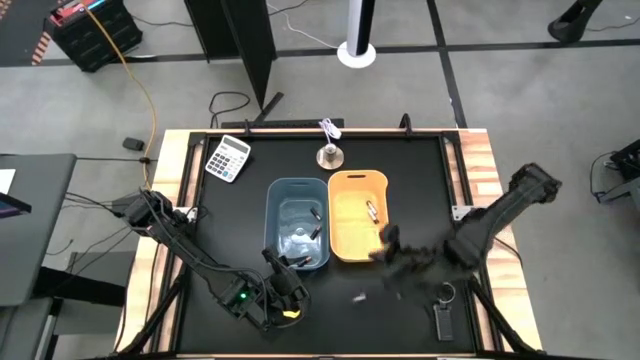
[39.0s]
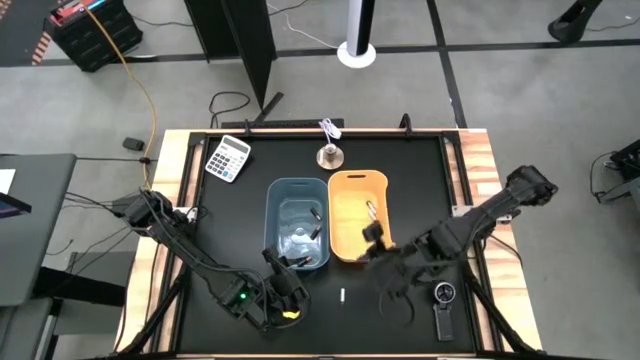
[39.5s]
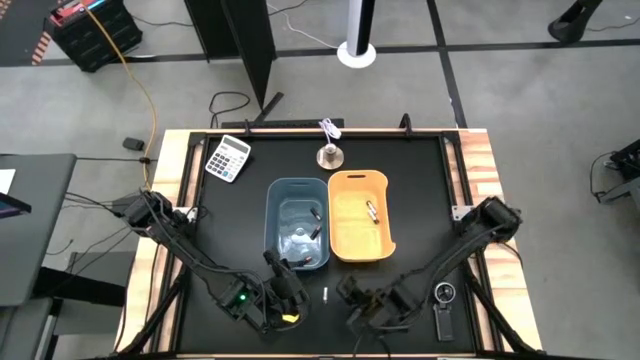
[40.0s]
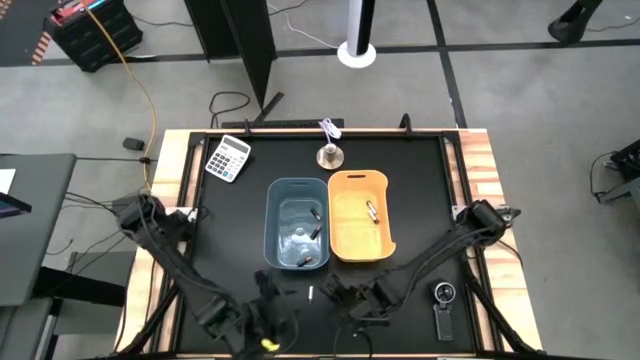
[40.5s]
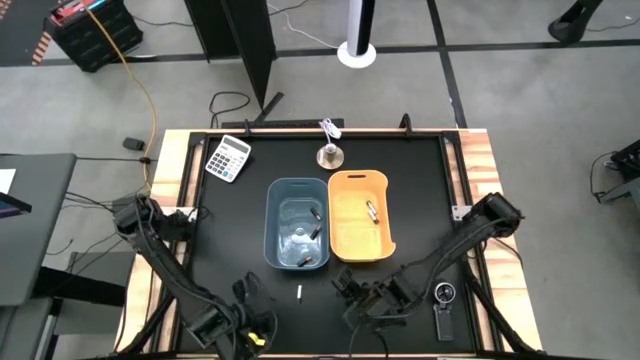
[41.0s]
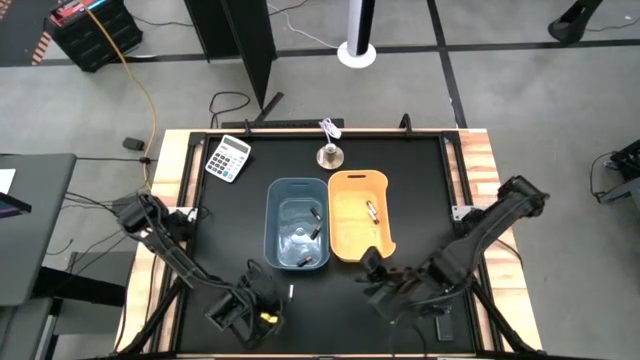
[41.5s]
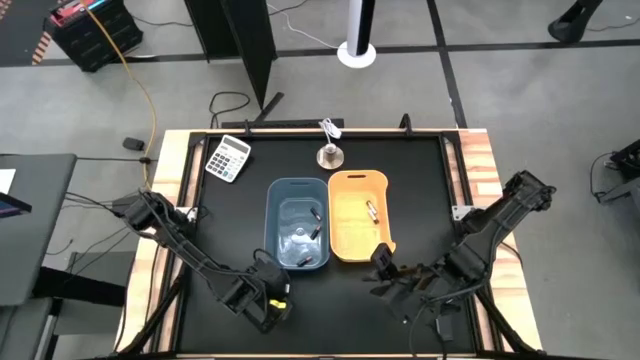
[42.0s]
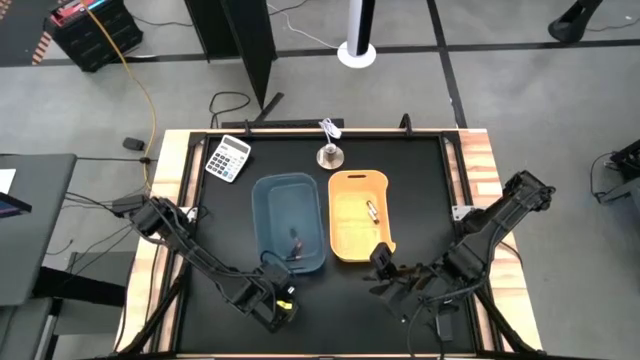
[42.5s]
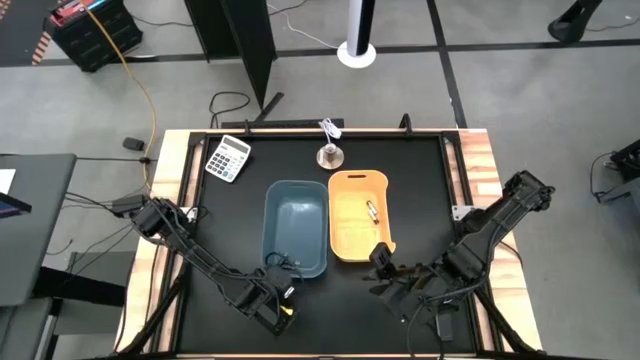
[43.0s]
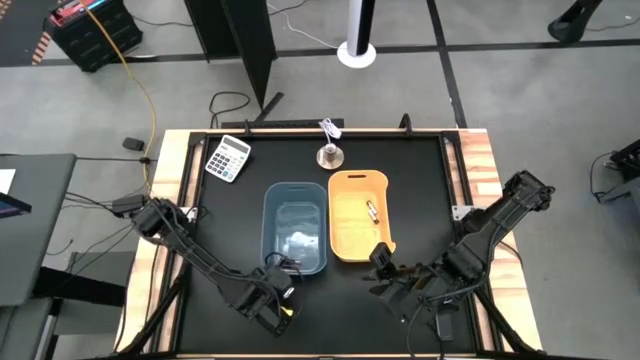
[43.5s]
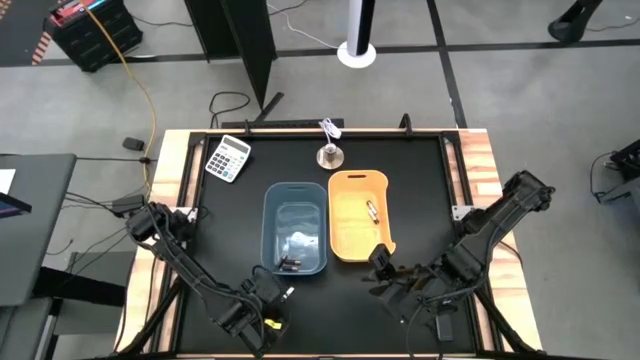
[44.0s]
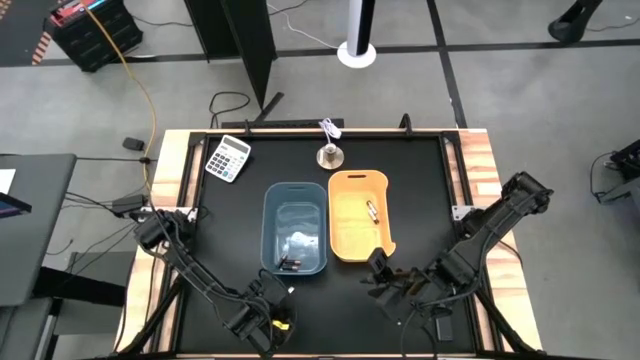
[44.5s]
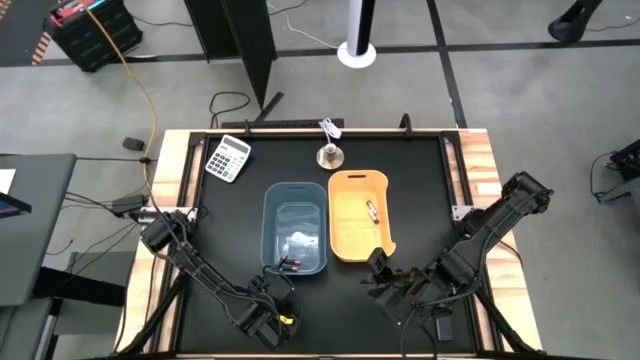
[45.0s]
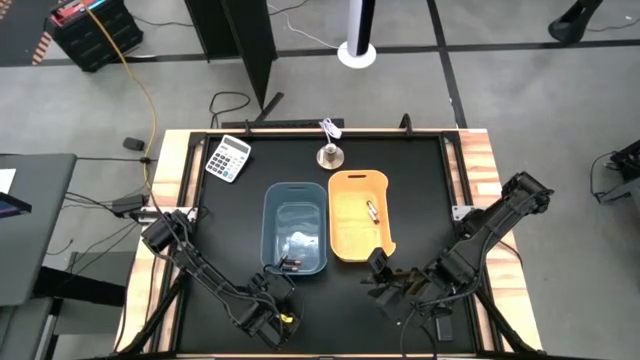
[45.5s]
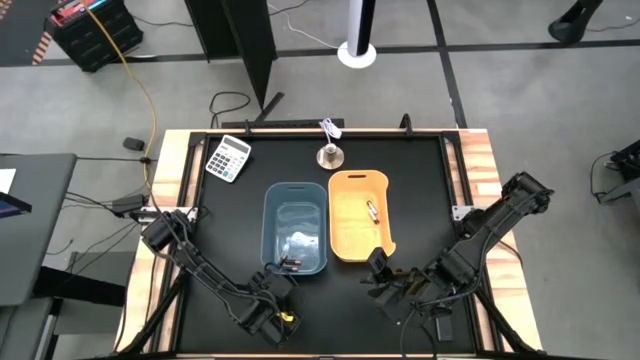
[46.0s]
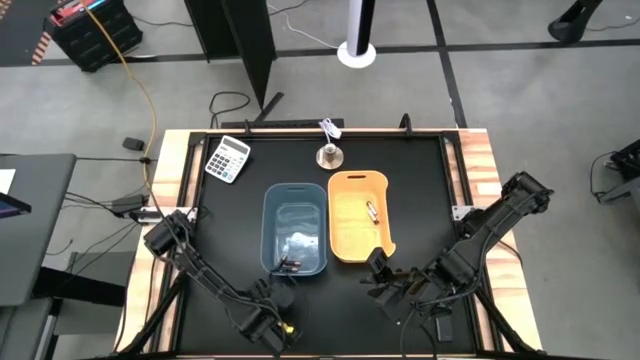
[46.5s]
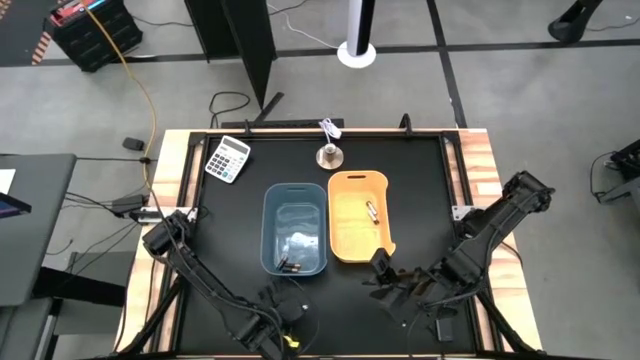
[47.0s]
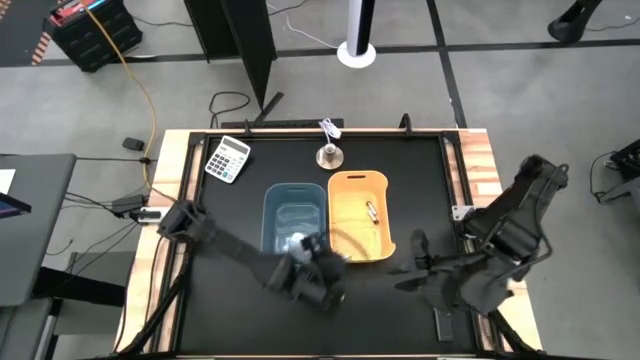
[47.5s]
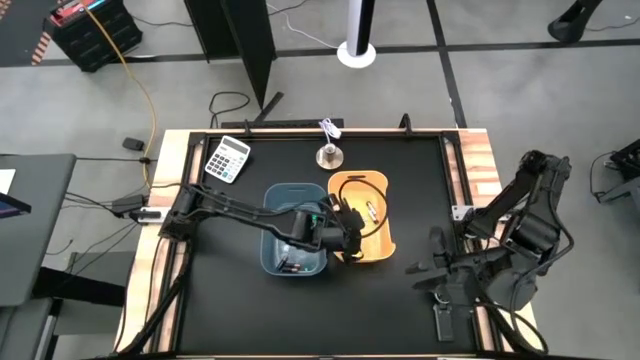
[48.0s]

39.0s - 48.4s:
Task: Sort batteries
Put the silver battery into the yellow bin

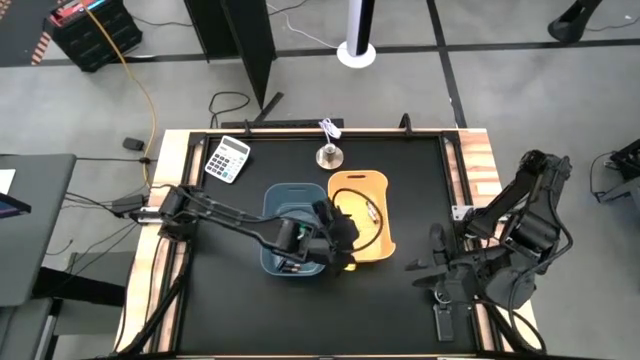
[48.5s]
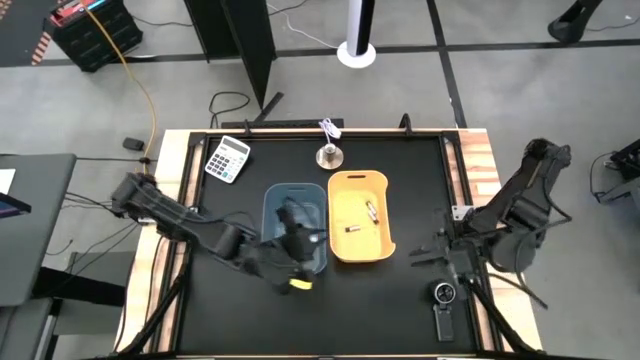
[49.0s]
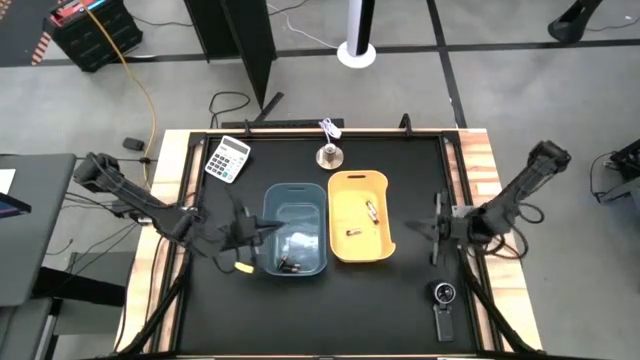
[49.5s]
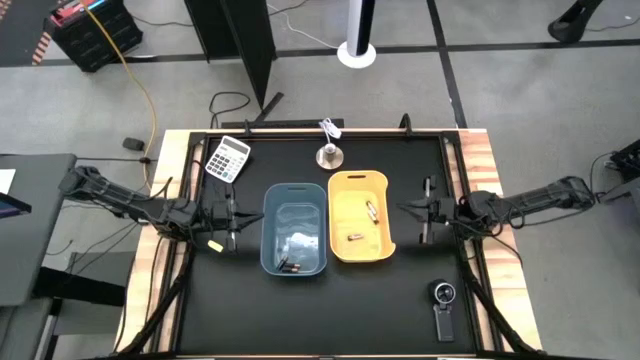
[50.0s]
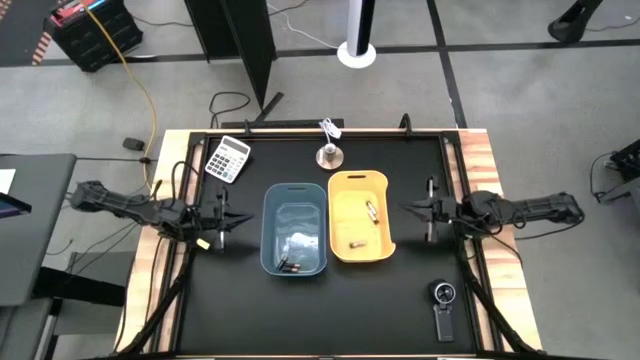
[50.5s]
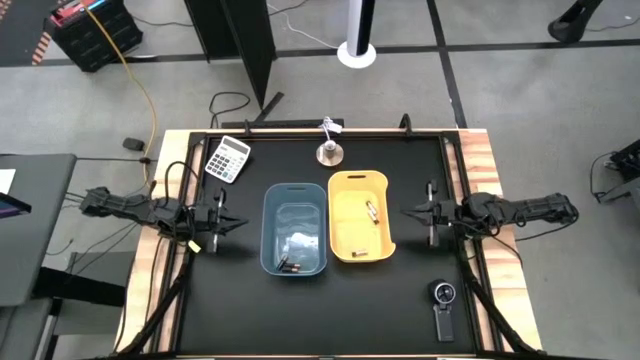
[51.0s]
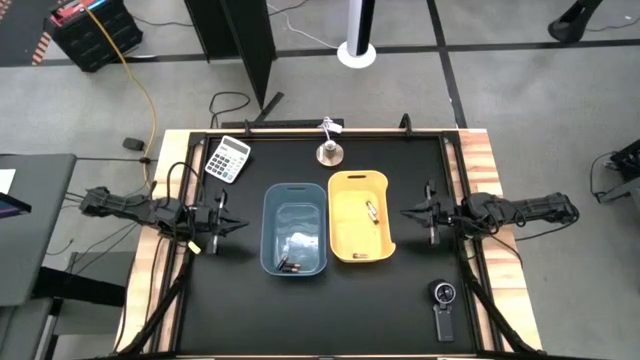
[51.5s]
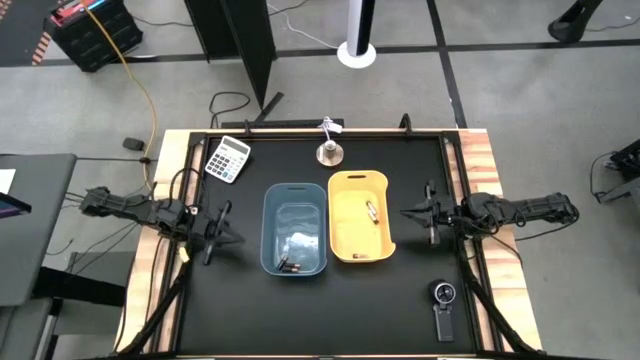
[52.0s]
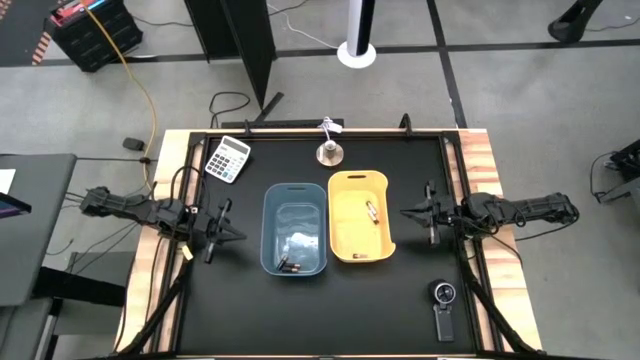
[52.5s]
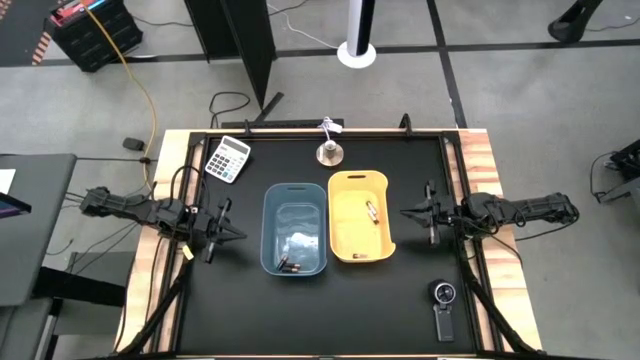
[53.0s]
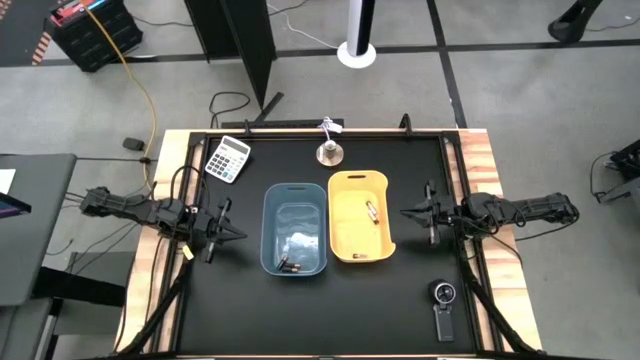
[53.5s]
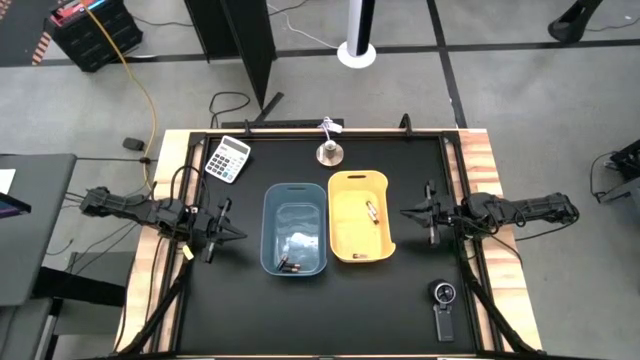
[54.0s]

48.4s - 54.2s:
Return to Home Position

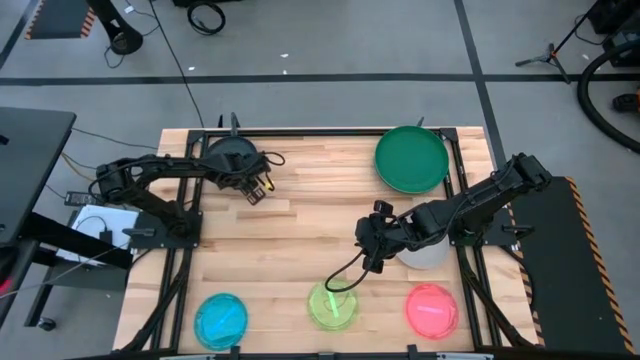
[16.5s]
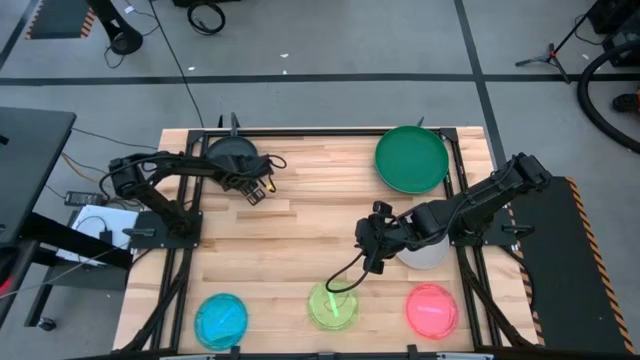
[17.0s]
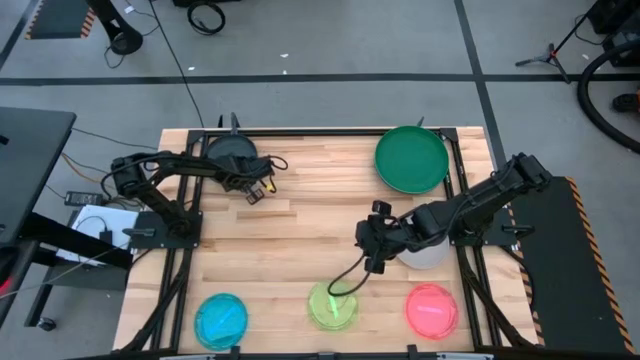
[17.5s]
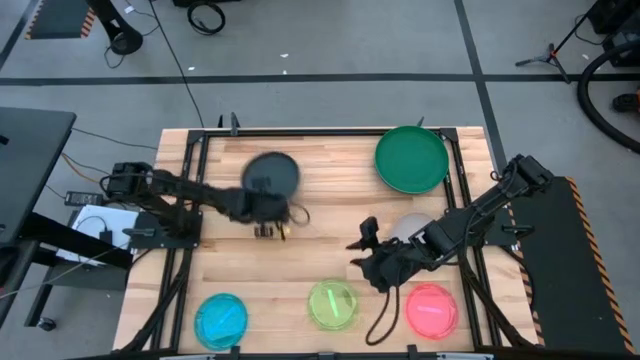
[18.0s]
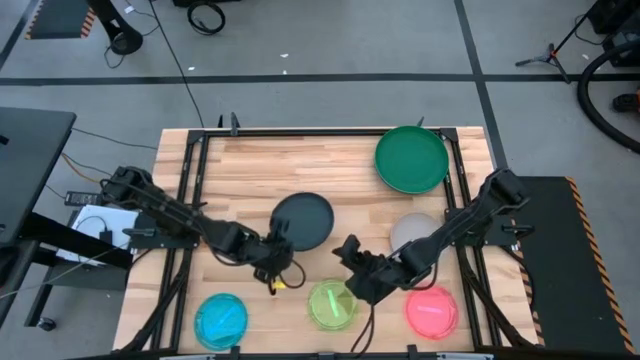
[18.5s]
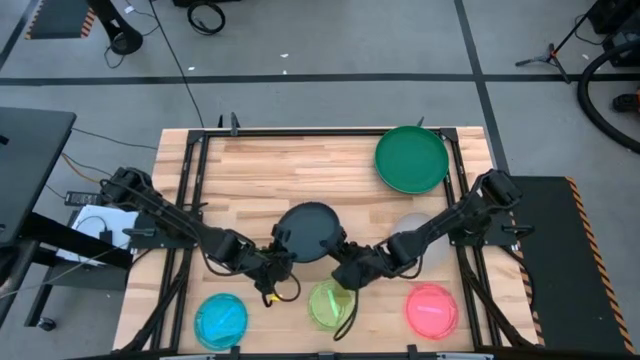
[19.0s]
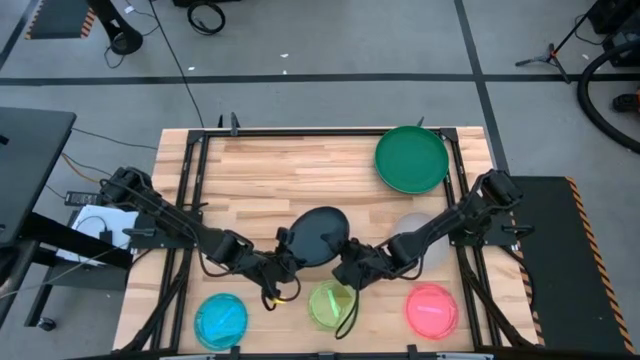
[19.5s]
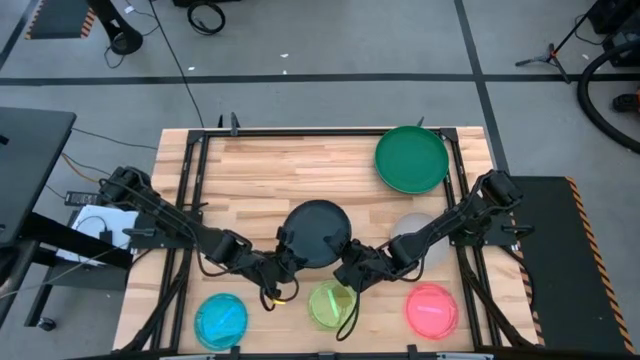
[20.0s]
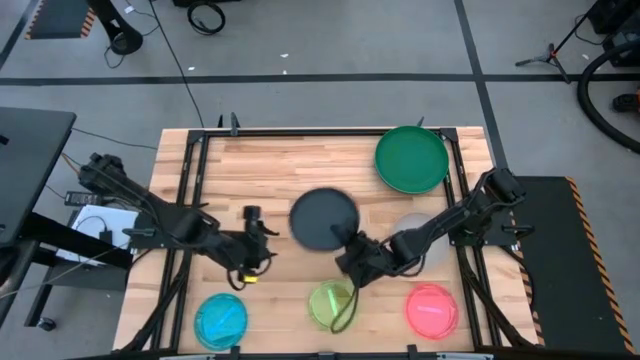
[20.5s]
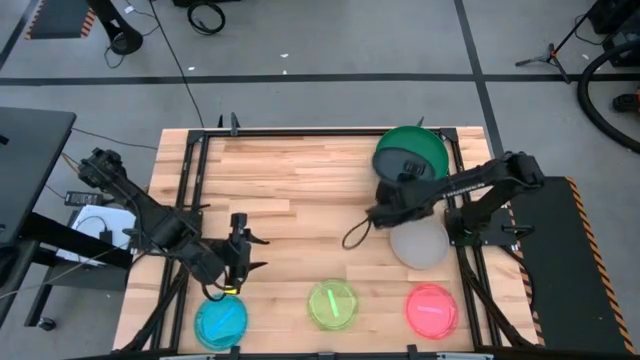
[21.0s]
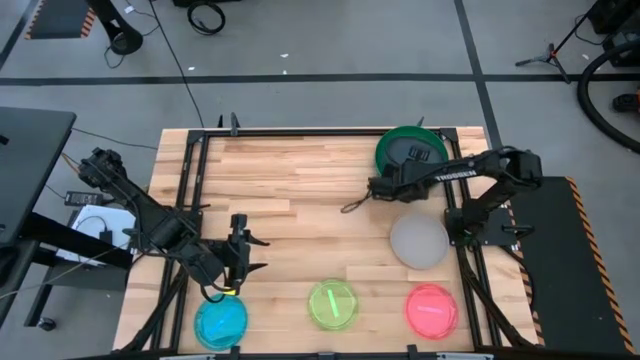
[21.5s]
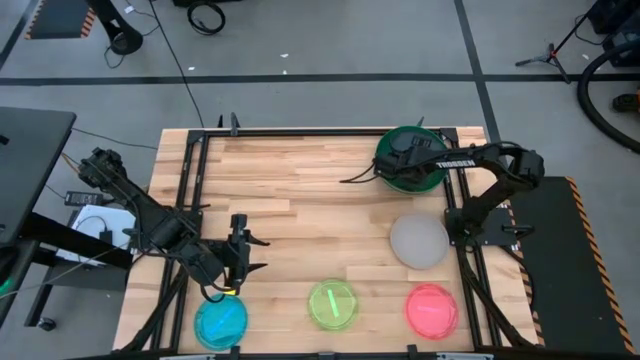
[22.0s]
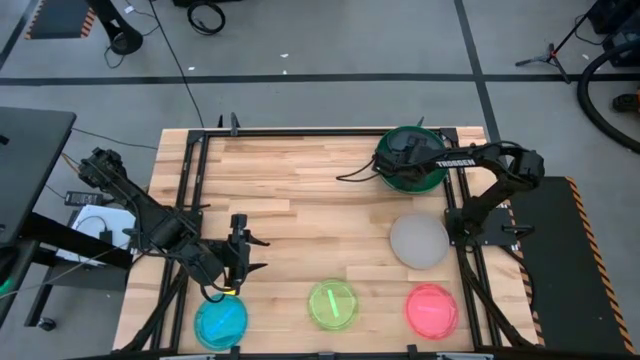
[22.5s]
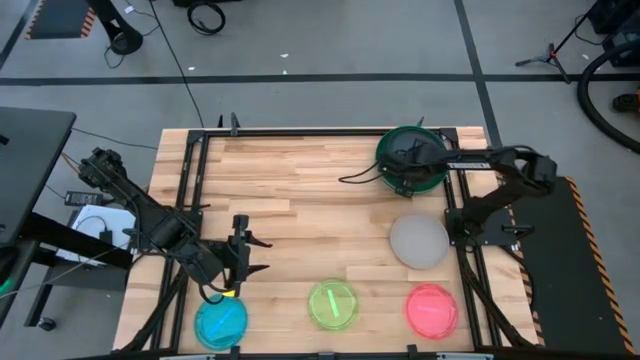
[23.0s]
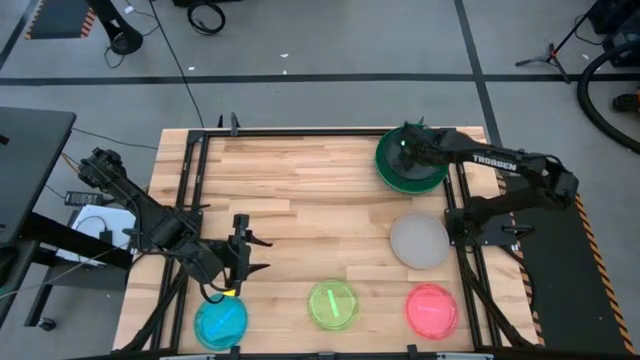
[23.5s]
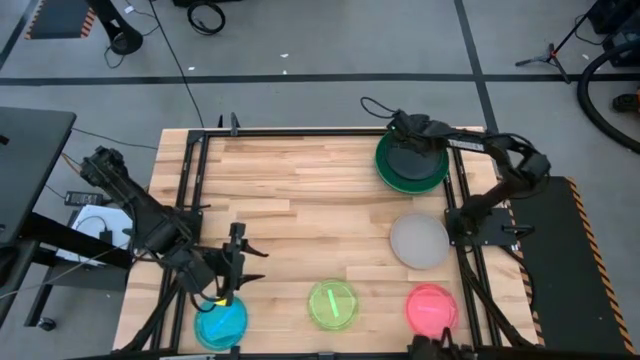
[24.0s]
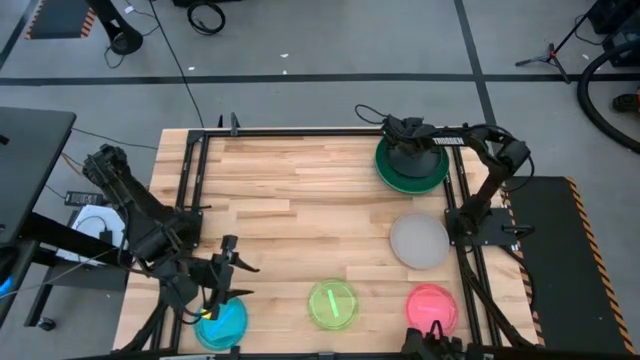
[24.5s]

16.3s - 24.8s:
Task: Stack plastic plates
Stack the stacked black plates on top of the dark green plate
